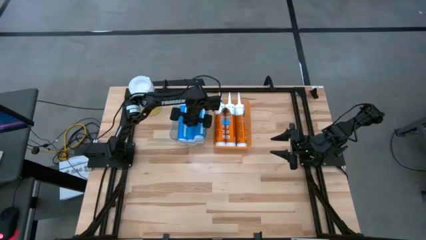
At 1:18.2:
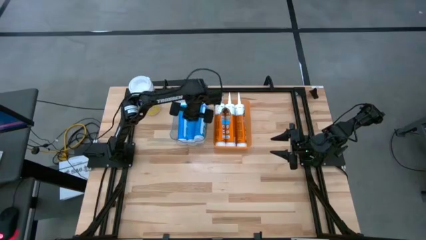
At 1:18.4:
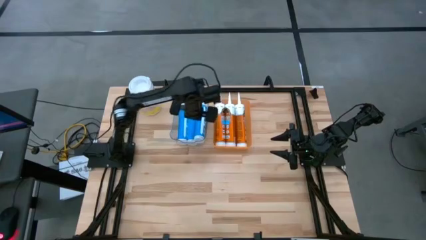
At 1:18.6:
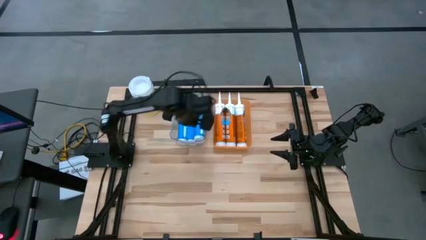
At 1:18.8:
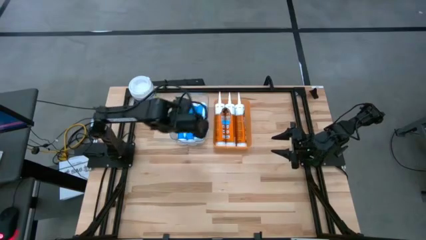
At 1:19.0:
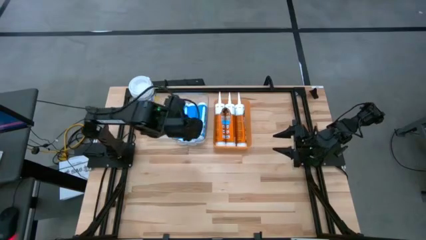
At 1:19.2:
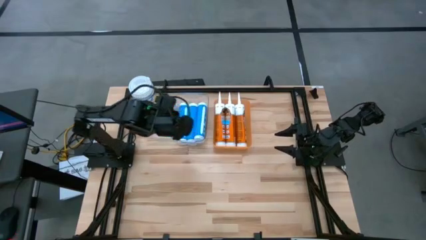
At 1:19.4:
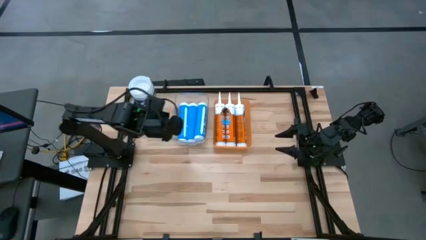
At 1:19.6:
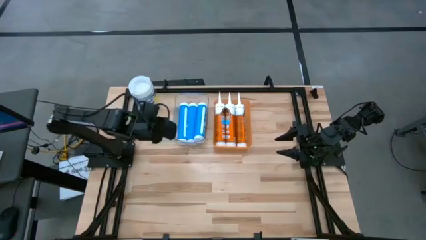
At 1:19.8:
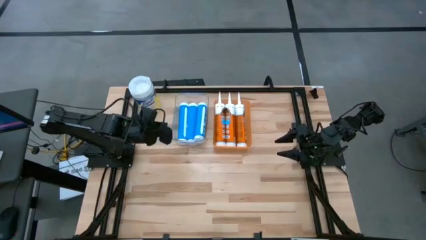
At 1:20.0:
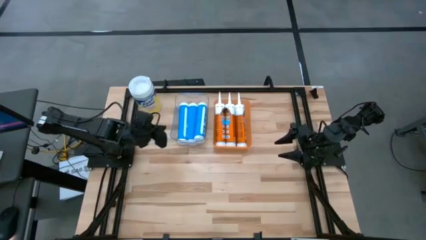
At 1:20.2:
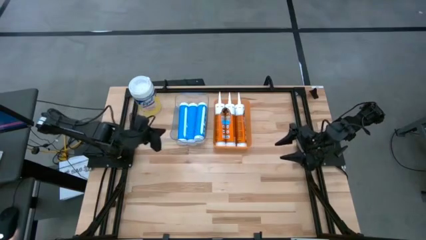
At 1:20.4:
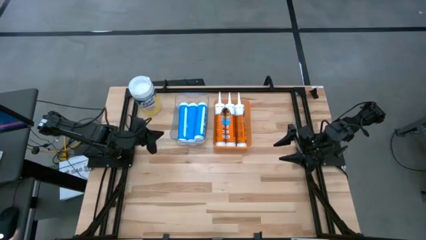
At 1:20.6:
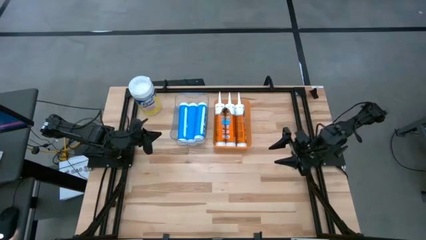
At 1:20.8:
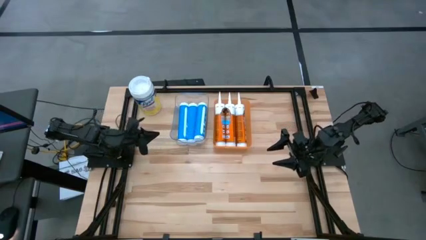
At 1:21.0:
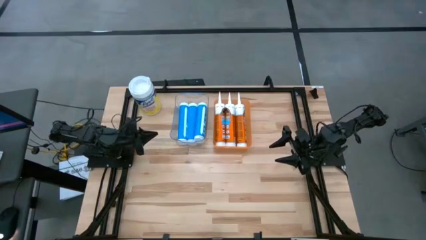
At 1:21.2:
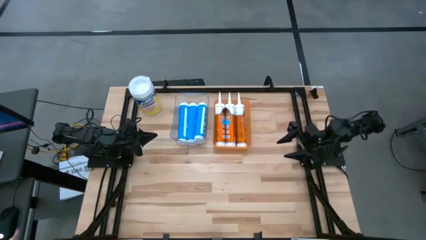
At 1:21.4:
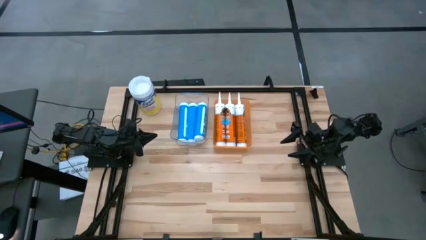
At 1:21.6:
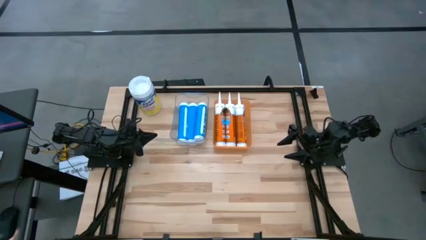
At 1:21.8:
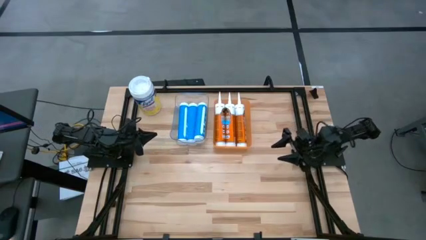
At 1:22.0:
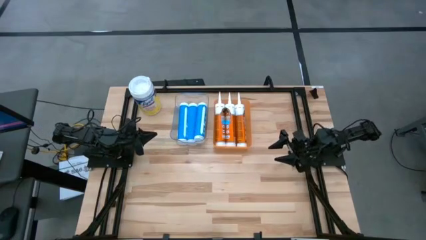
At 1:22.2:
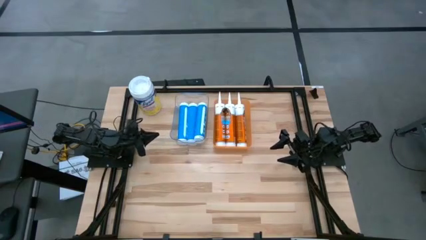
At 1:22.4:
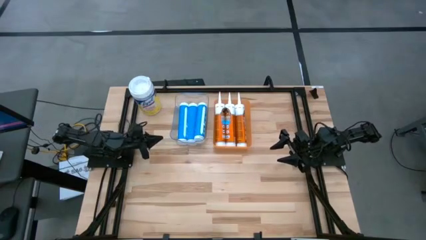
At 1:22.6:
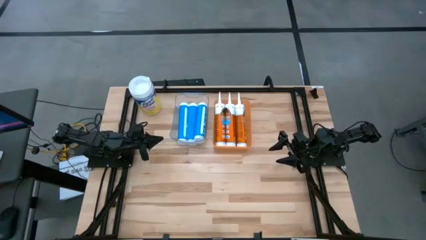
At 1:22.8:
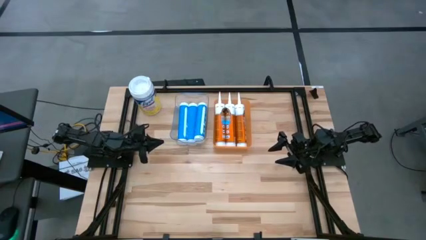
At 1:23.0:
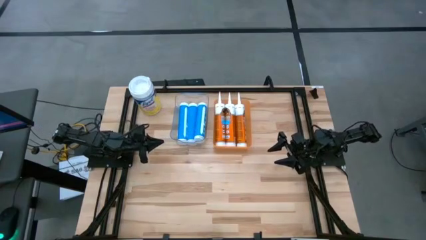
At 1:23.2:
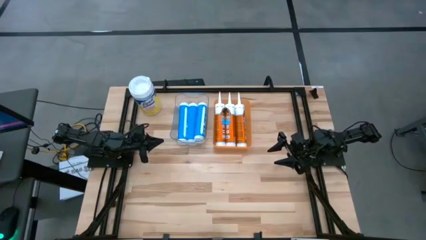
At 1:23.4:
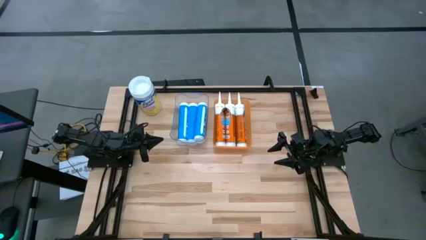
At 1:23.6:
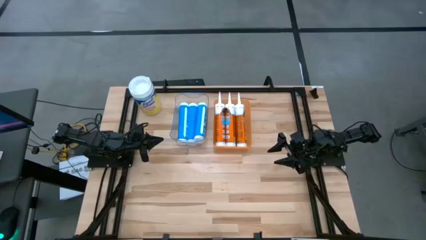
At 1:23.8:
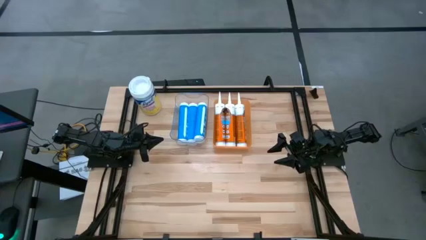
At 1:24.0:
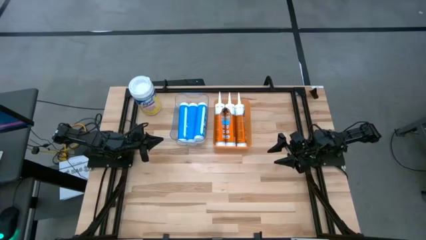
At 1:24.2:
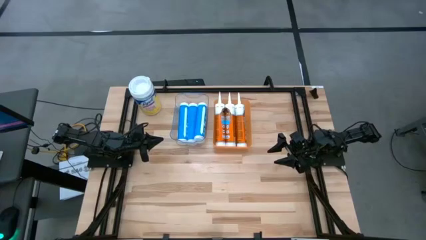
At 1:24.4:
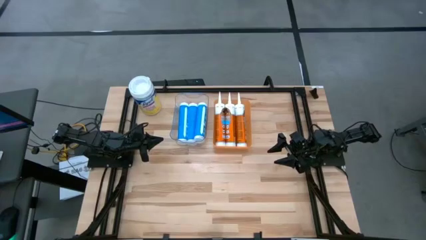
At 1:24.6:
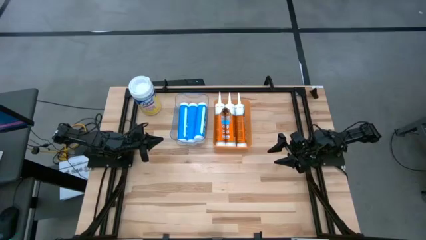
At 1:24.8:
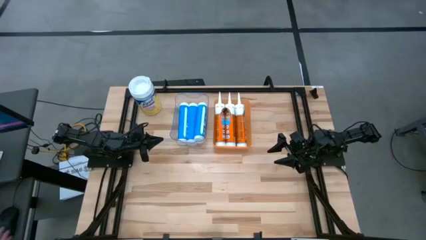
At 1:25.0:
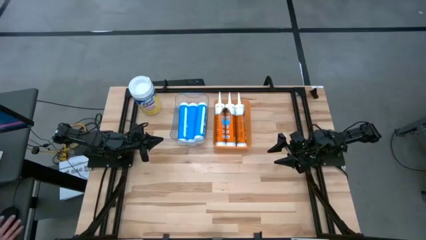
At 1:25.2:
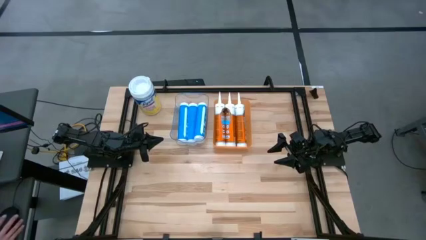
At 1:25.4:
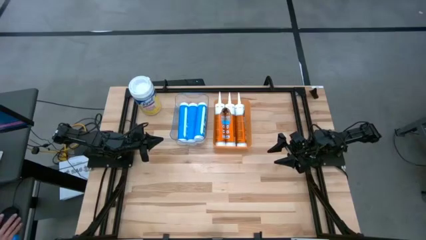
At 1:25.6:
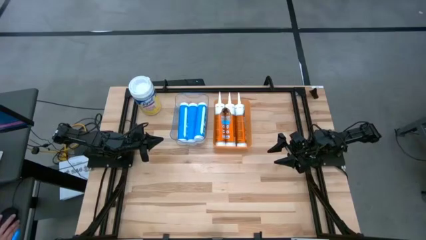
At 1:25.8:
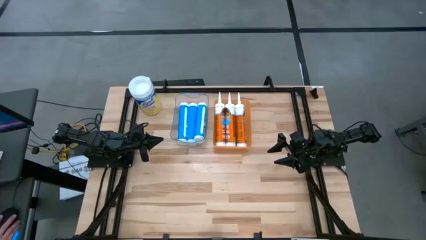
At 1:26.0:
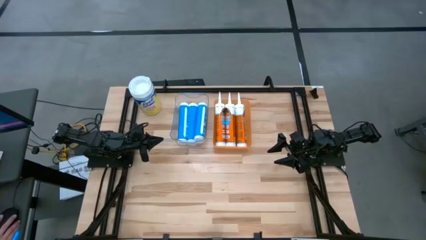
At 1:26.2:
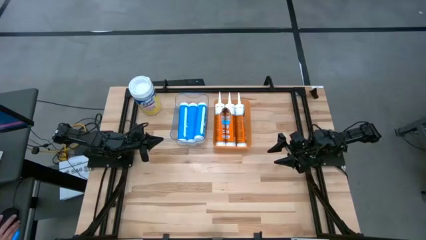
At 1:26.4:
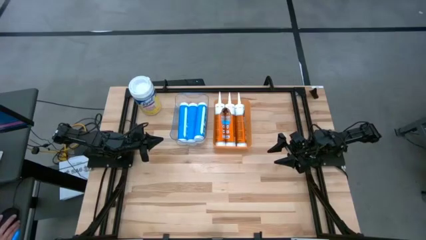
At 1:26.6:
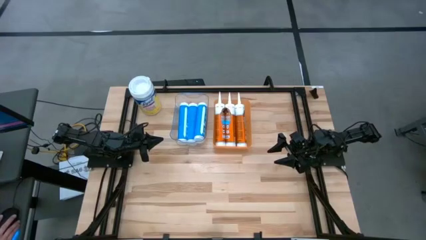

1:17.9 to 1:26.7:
Task: Pick & place silicon tubes, Sealant and Lysol wipes
Return to Home Position

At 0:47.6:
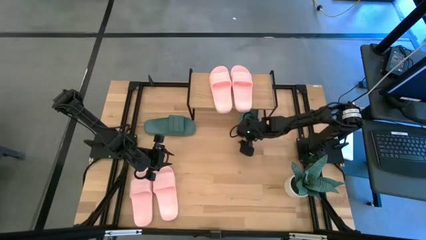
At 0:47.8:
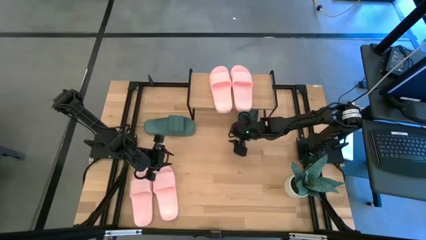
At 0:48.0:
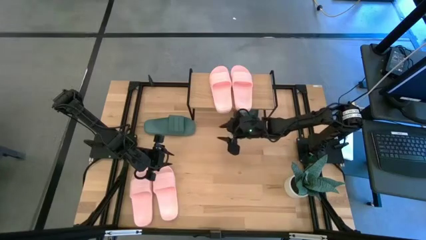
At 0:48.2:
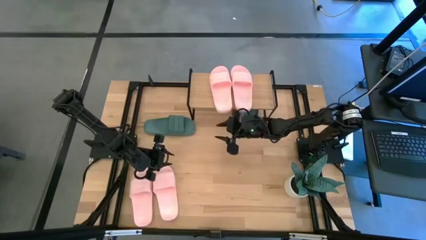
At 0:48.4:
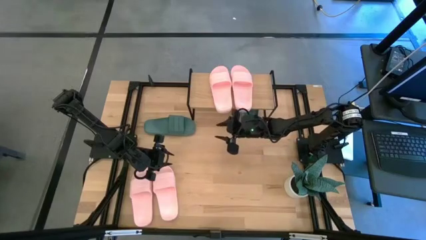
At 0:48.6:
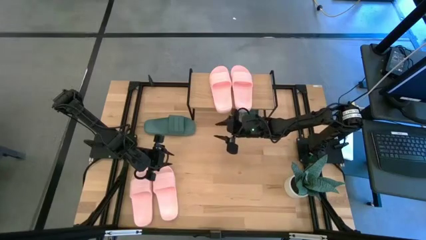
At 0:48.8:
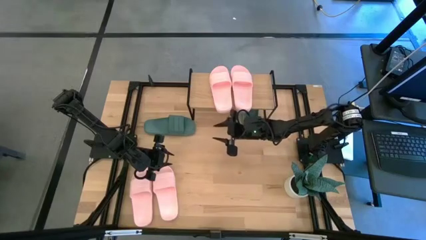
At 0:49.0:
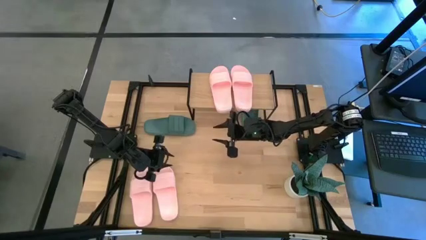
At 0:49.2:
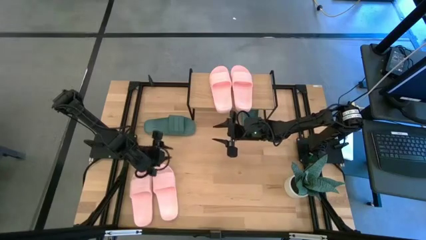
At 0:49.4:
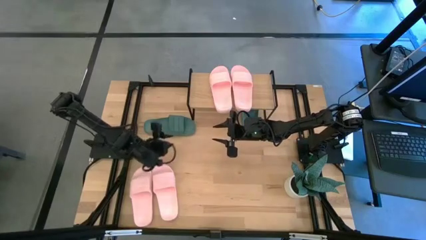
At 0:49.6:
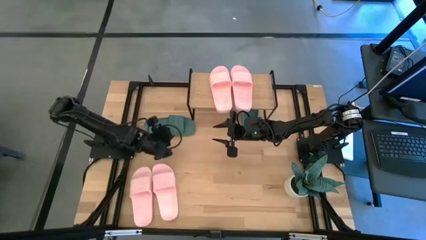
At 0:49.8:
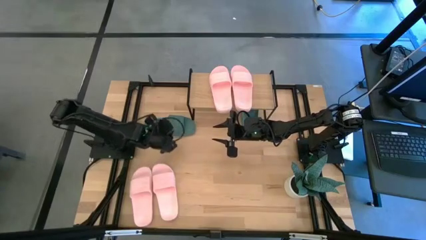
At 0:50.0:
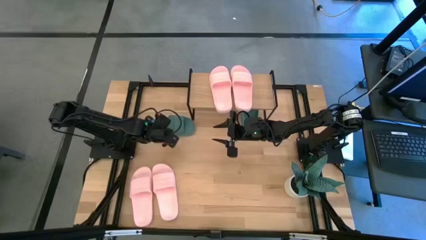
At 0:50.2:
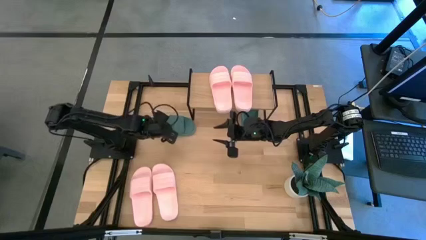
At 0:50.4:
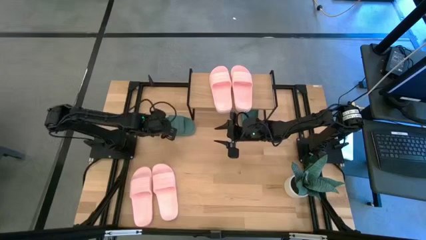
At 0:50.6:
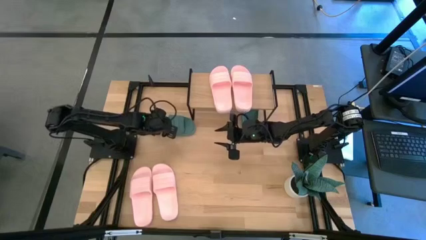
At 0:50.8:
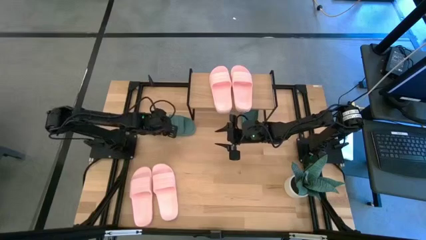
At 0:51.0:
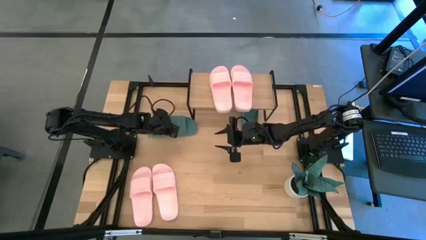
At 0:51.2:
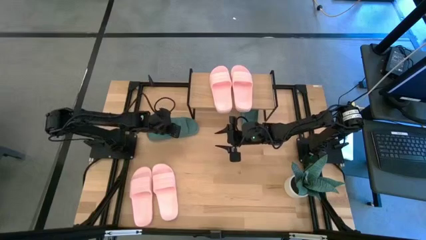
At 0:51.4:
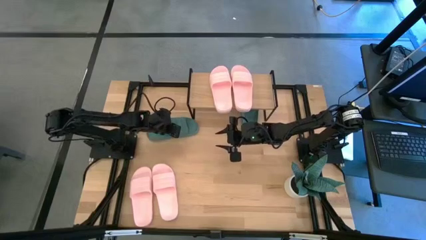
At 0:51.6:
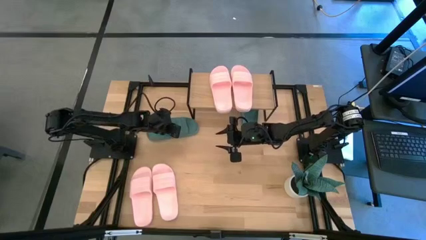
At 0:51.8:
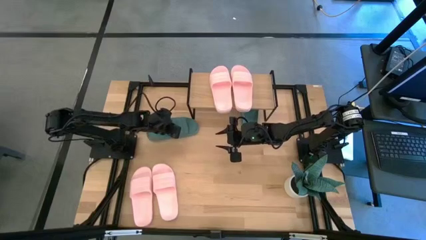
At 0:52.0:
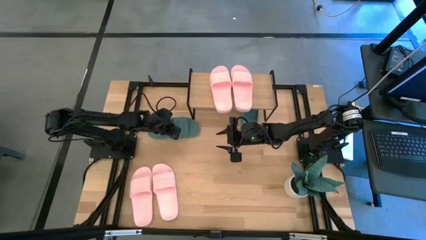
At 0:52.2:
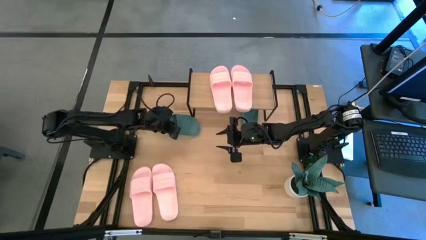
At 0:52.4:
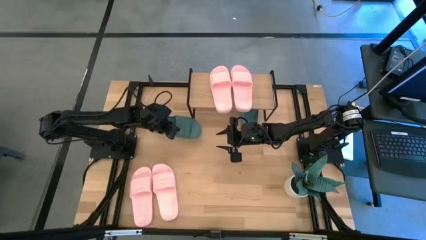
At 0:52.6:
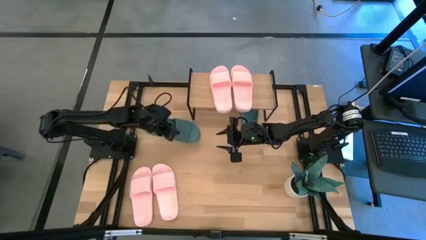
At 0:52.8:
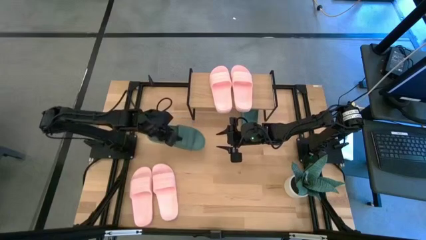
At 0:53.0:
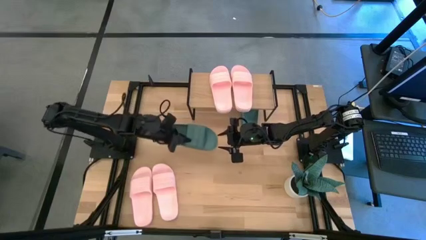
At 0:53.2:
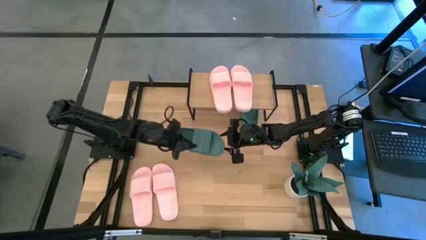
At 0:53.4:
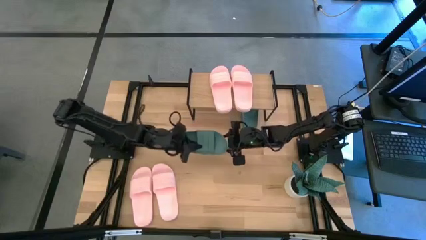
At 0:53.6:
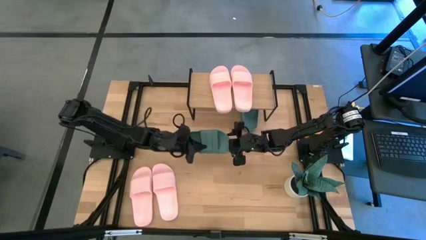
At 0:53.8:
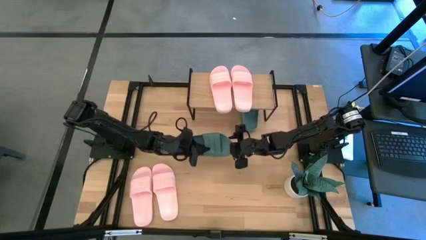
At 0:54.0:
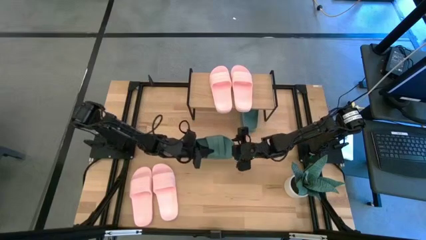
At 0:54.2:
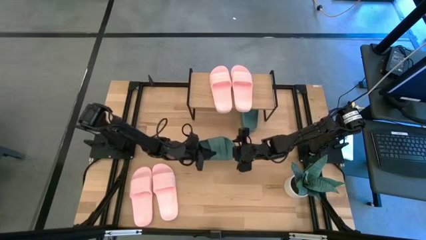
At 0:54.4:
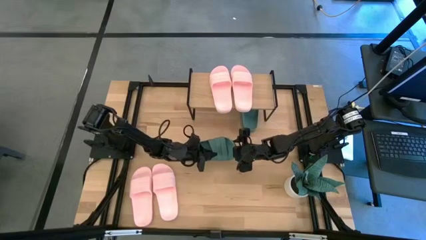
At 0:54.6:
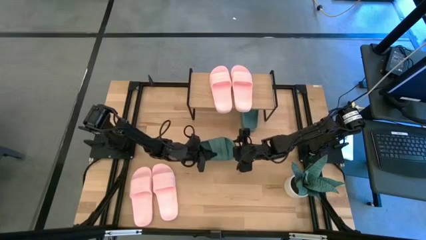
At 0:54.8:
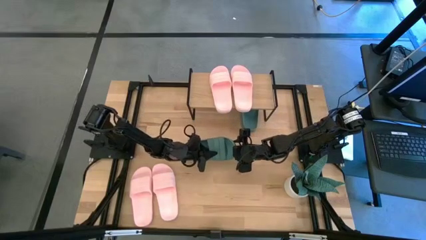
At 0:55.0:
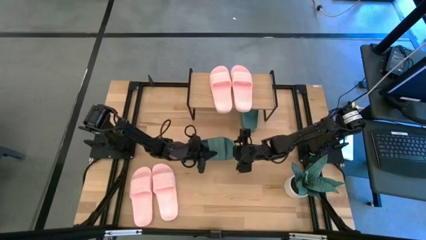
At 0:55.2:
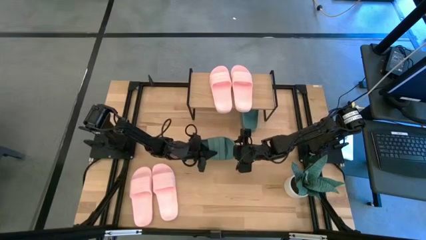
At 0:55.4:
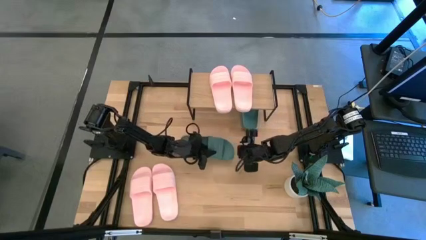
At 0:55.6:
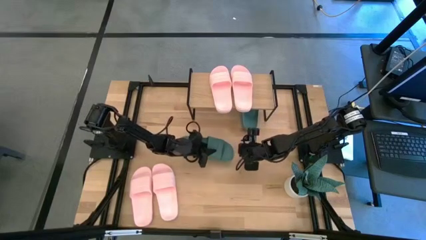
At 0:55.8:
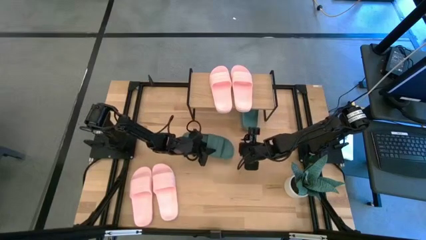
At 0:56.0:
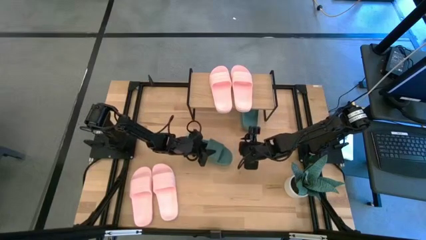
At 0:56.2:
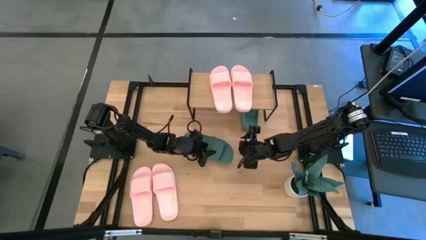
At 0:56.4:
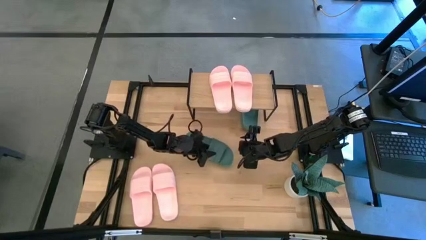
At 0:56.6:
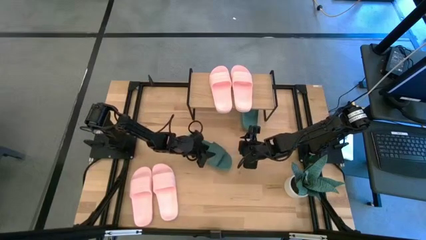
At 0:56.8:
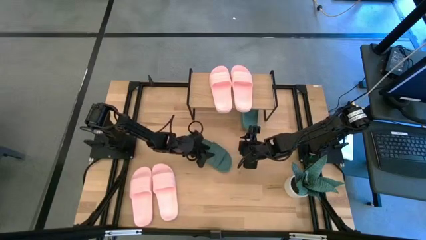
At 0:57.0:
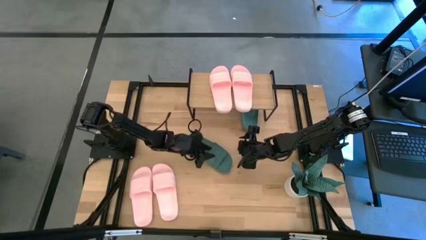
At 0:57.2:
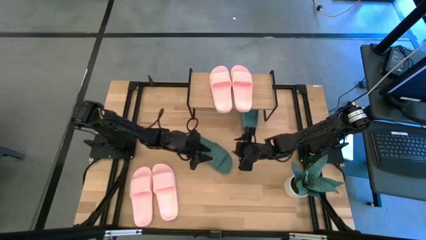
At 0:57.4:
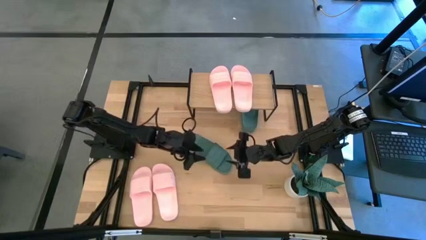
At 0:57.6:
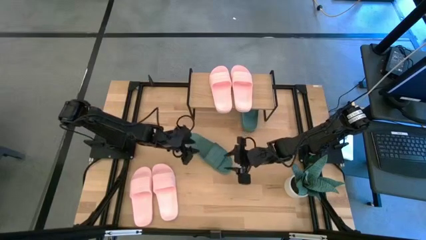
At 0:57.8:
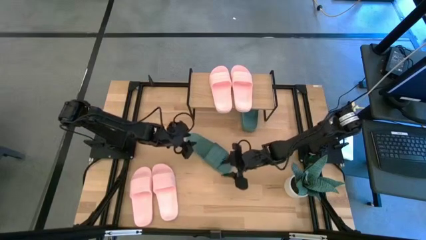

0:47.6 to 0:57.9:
Task: Pick and place slides into the shelf
Put the green slipper under the shelf
